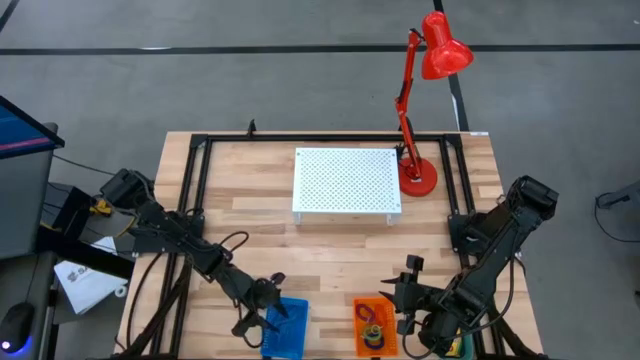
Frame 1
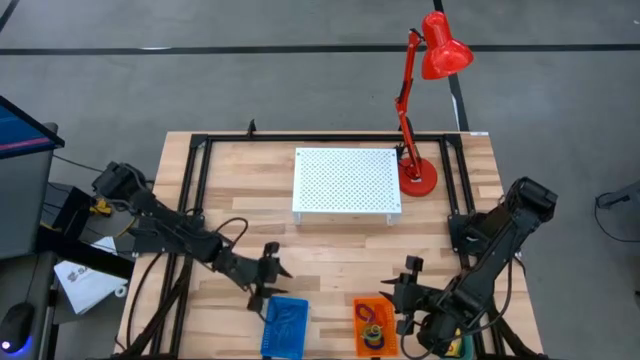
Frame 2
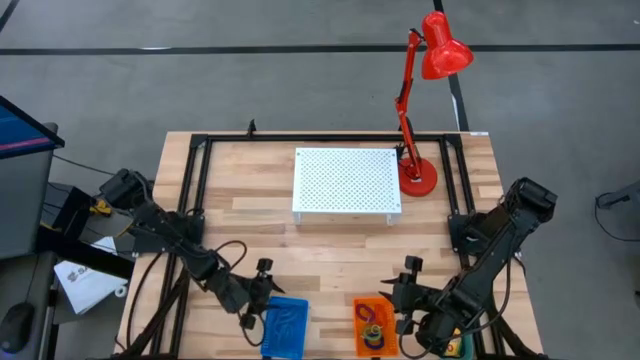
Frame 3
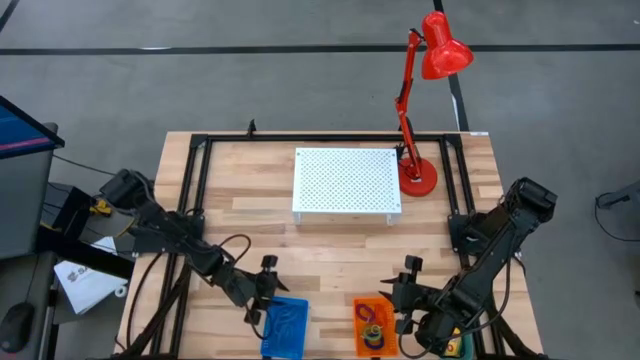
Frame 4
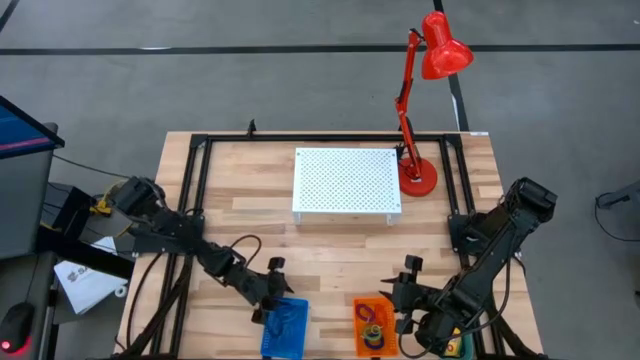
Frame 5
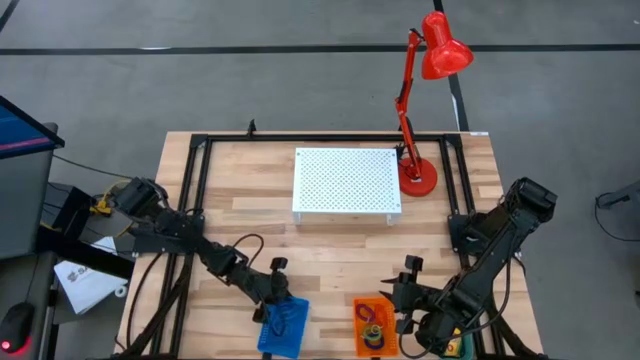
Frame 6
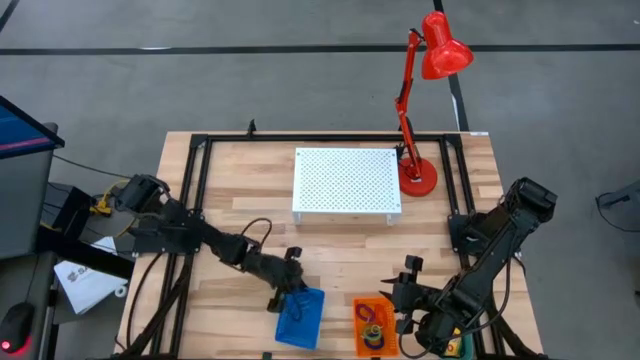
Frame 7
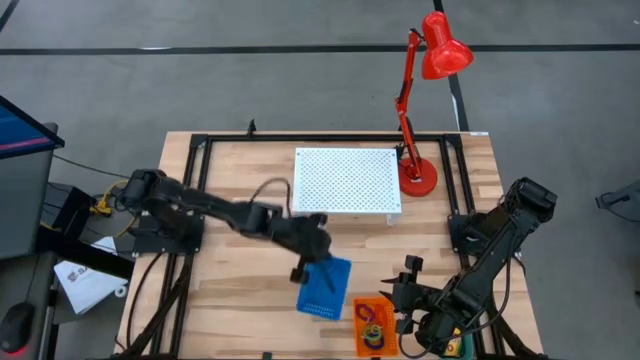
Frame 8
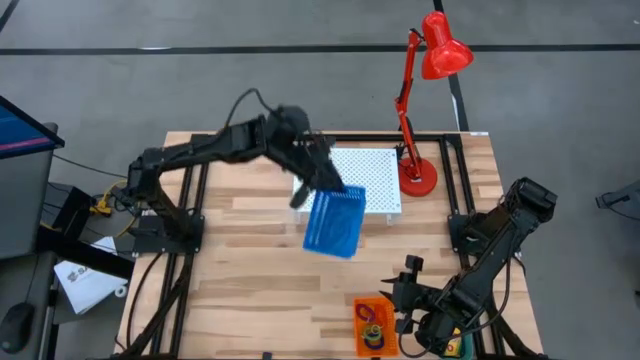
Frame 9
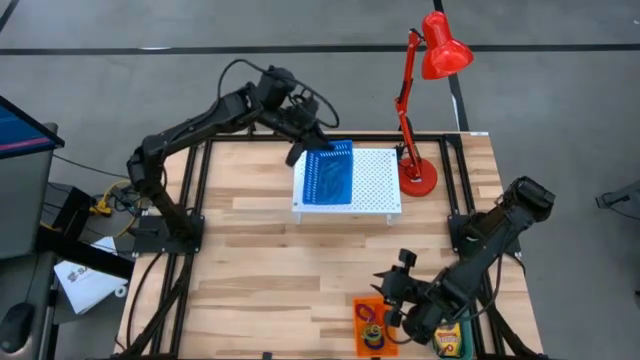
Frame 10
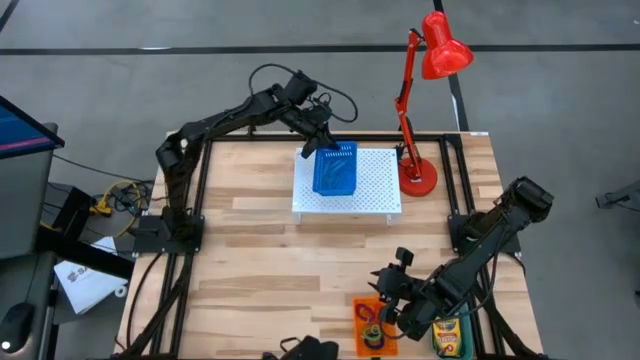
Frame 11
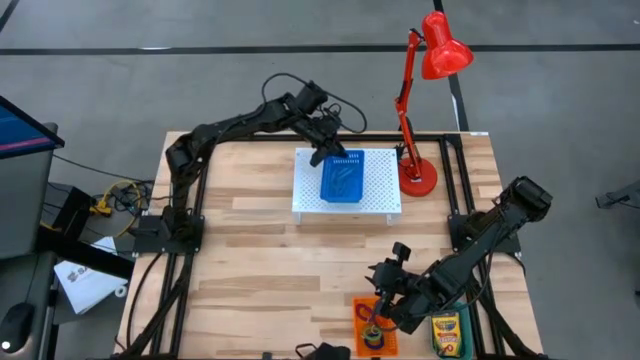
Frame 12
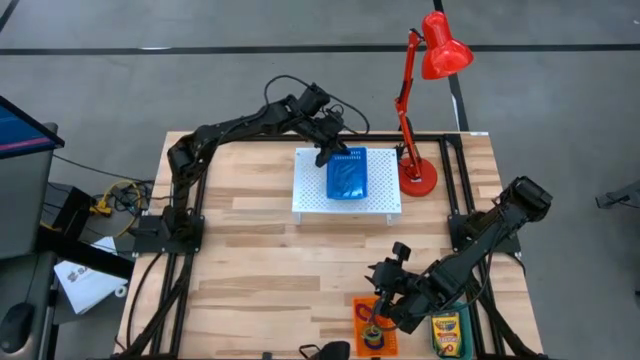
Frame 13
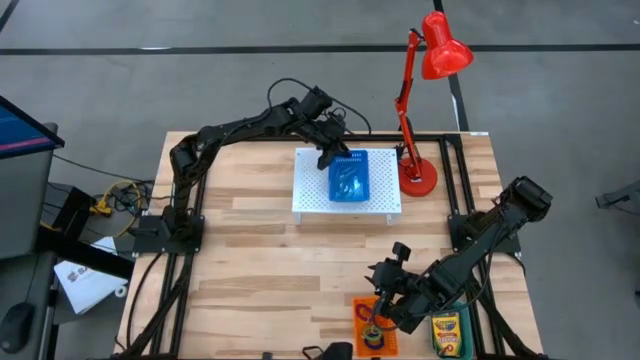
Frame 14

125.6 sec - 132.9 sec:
Task: Pick & Place Office Desk Supplies
Put the blue bin on the shelf

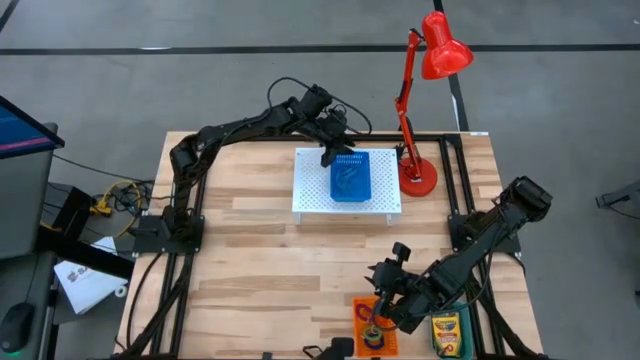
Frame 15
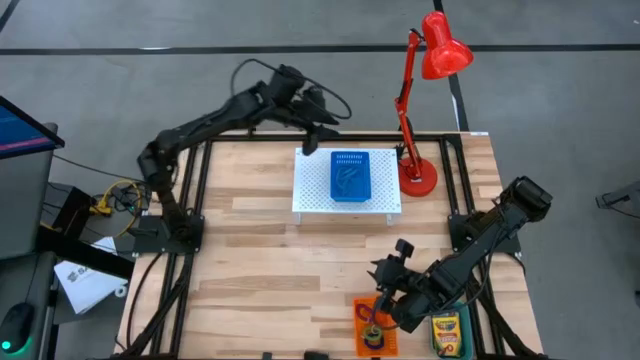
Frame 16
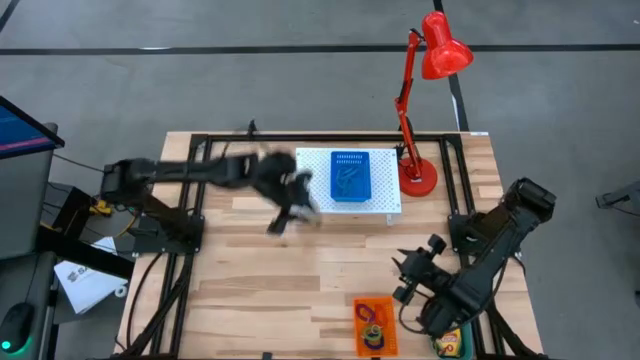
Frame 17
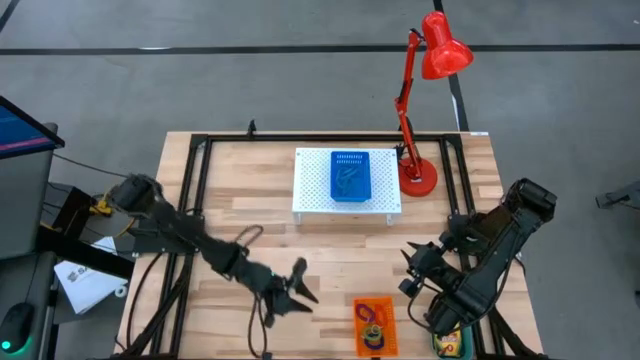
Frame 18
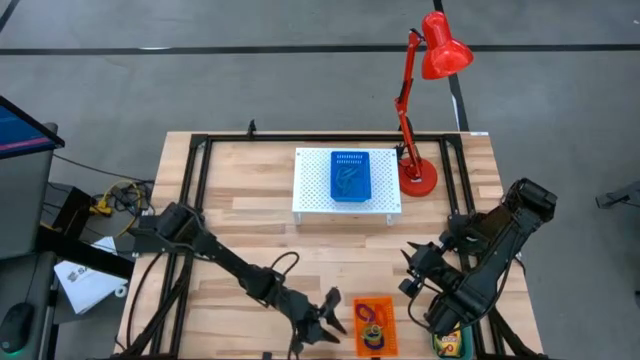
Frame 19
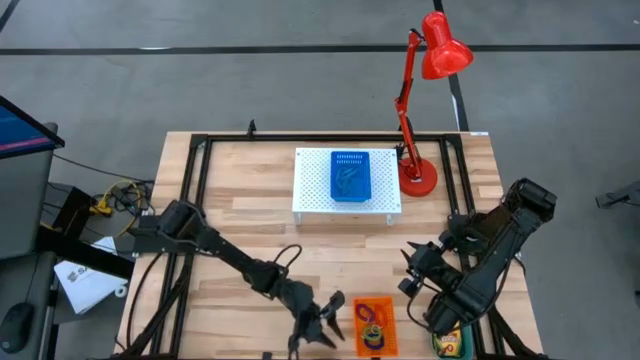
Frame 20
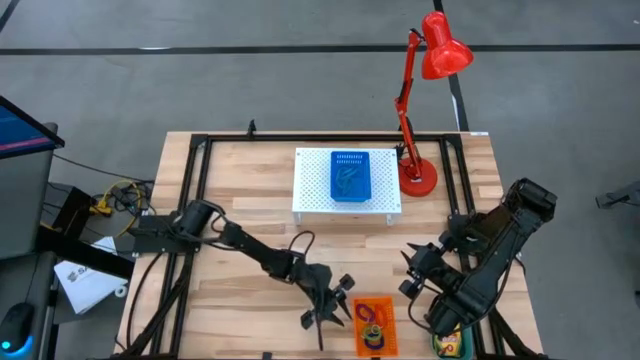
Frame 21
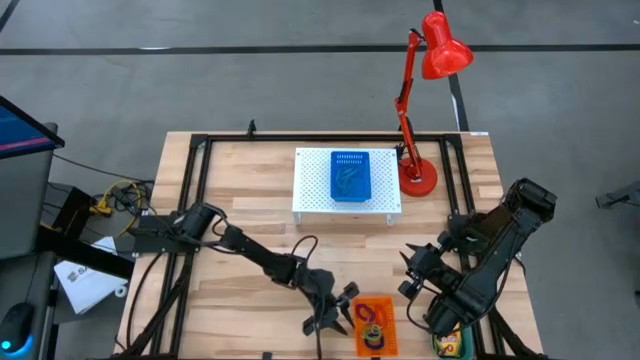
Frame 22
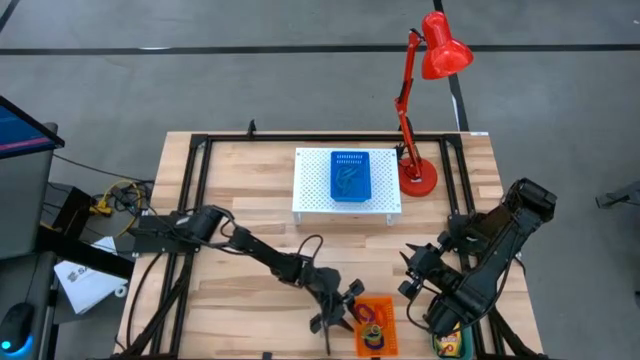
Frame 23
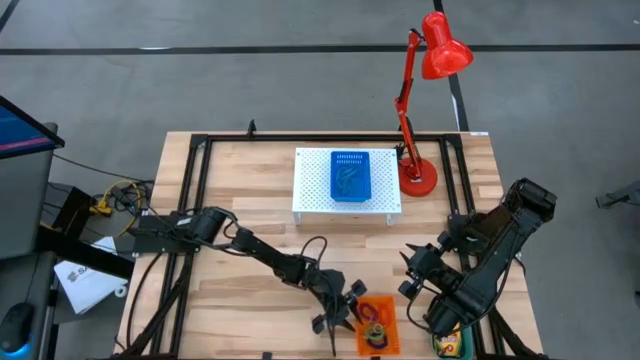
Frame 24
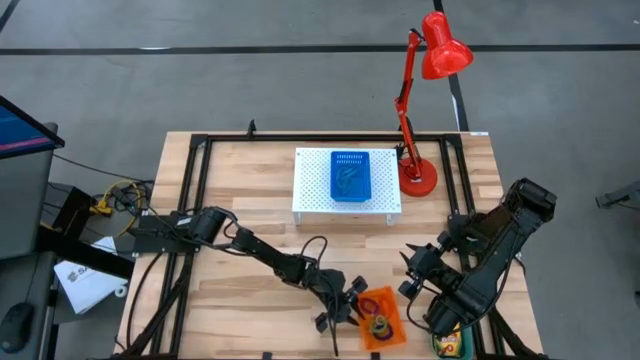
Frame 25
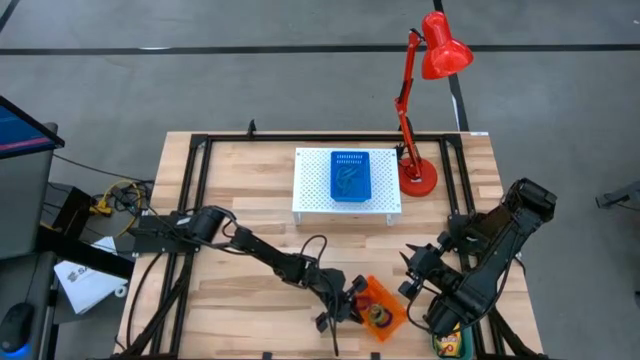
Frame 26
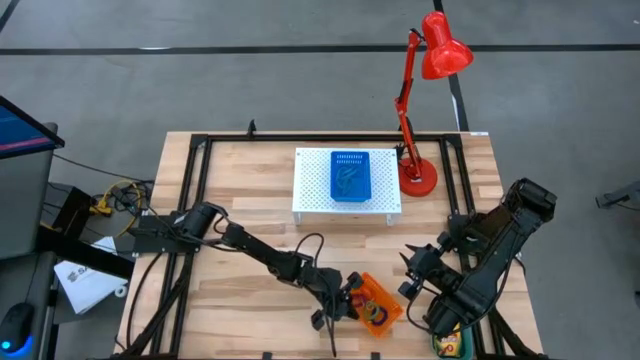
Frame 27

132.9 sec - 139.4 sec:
Put the orange bin on the shelf

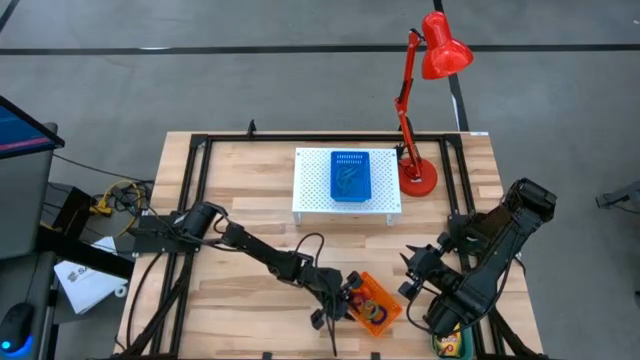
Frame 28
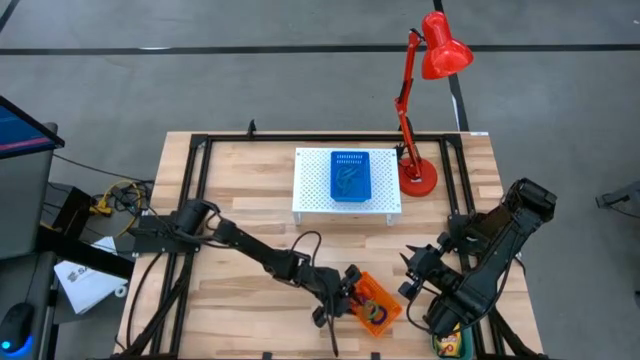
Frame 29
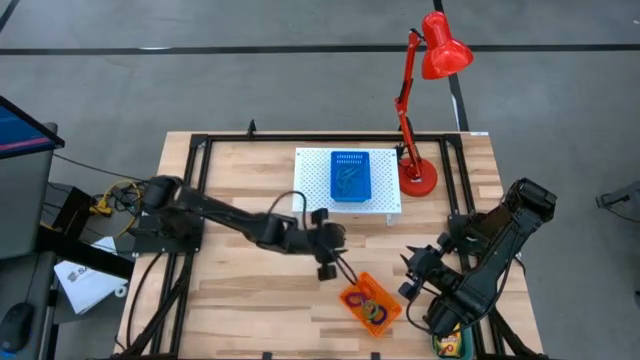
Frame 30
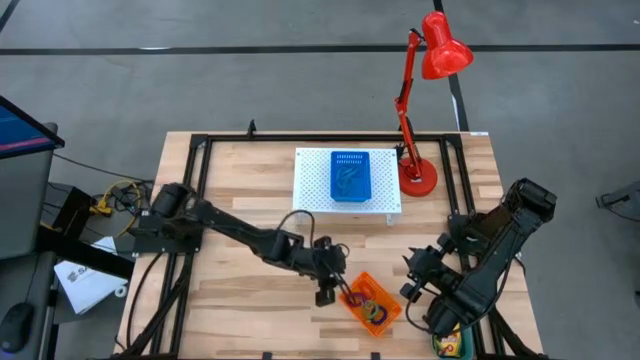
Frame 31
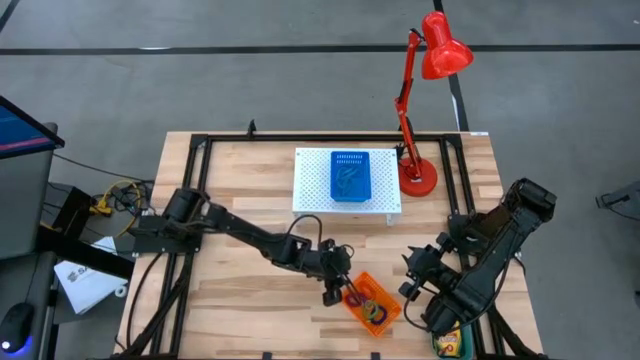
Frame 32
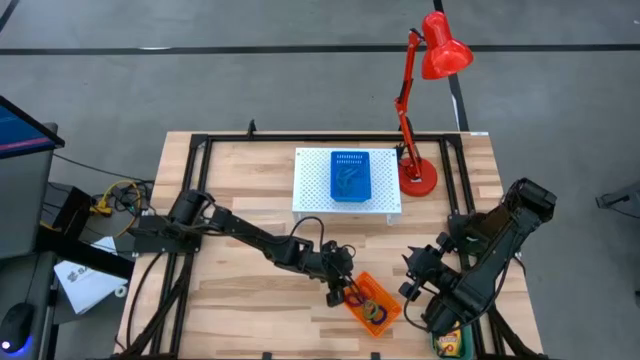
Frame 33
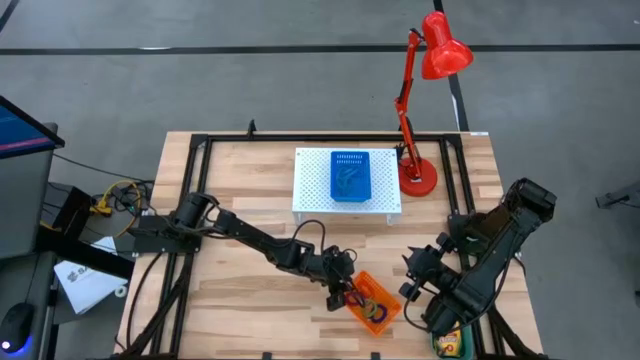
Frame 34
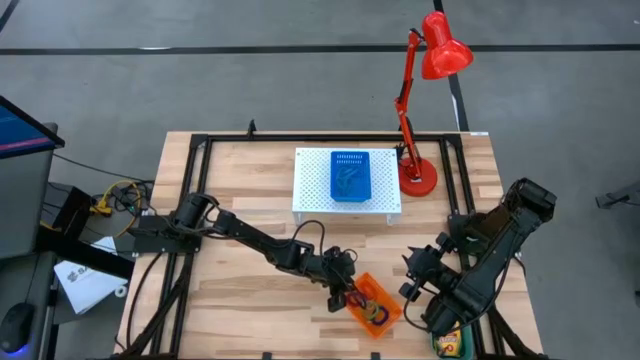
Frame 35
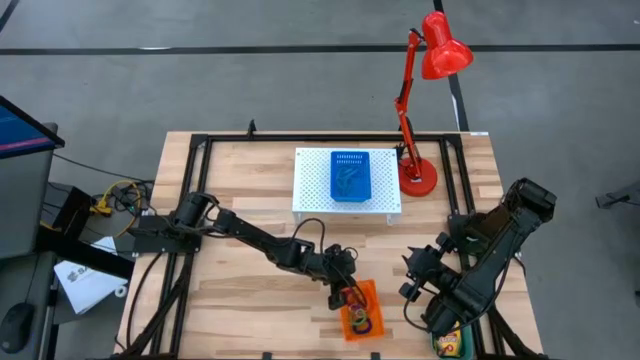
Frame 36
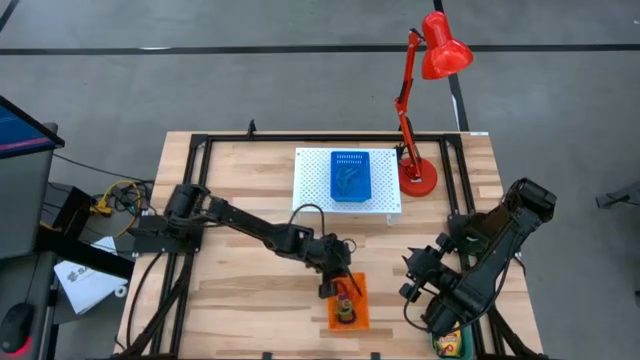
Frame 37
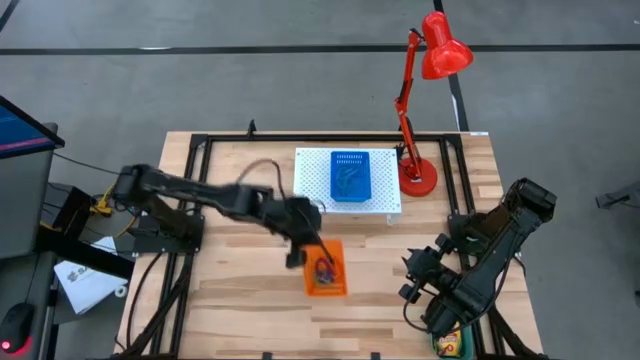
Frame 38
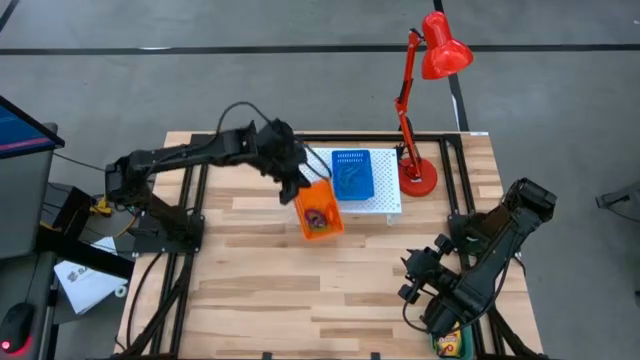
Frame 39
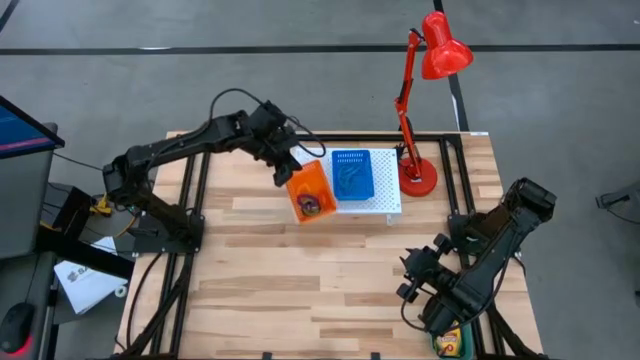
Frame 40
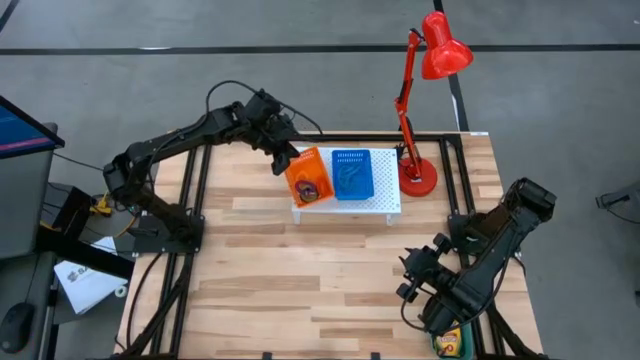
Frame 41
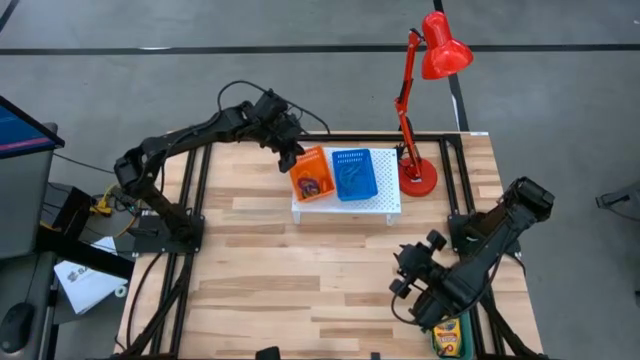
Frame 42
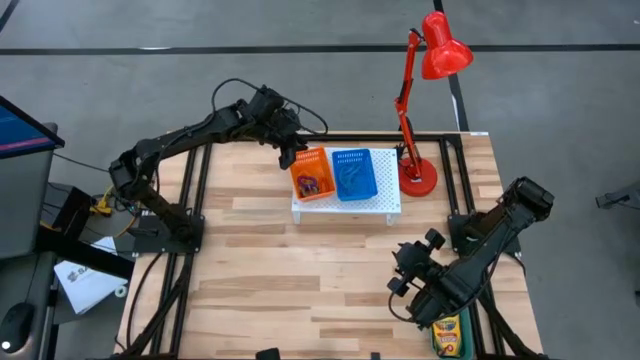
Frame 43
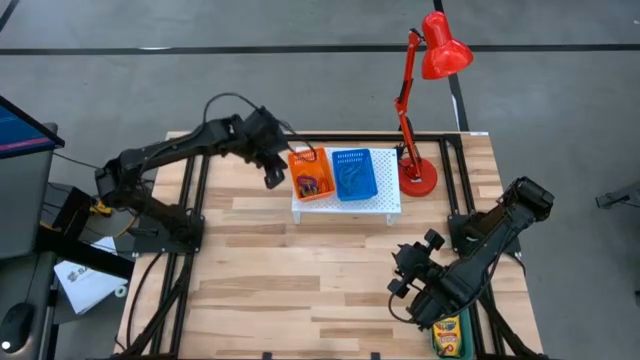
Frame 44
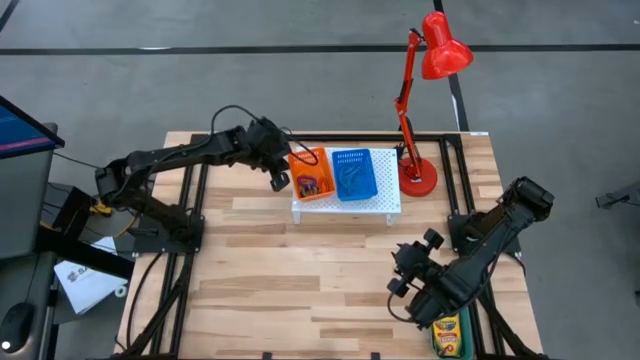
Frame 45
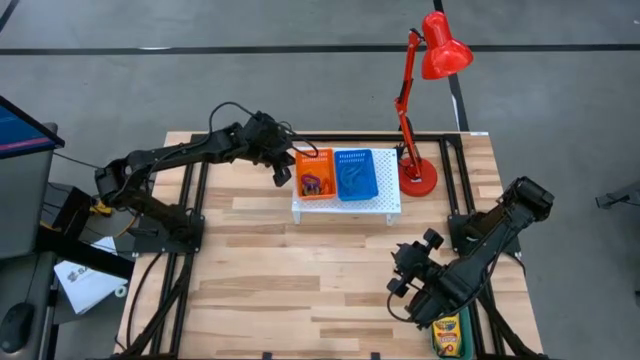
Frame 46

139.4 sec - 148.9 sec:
Put the orange bin on the shelf
